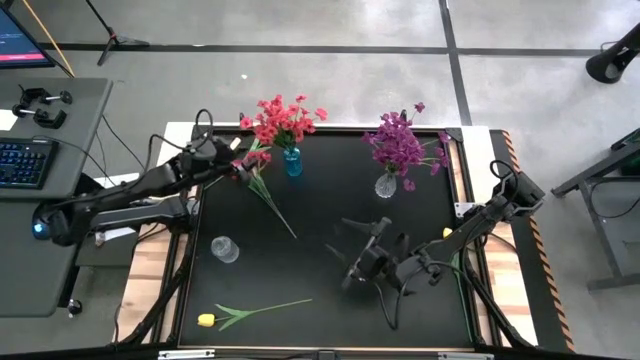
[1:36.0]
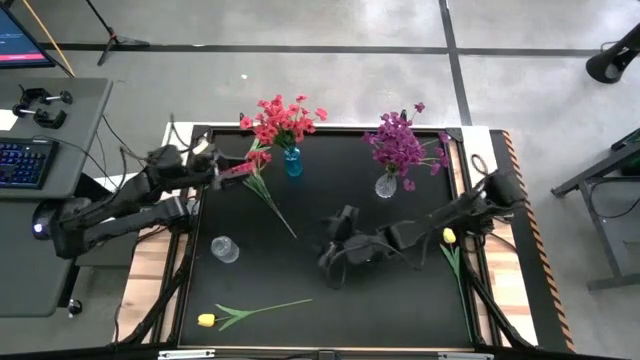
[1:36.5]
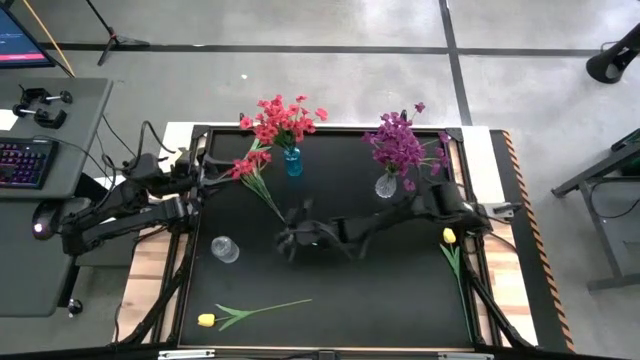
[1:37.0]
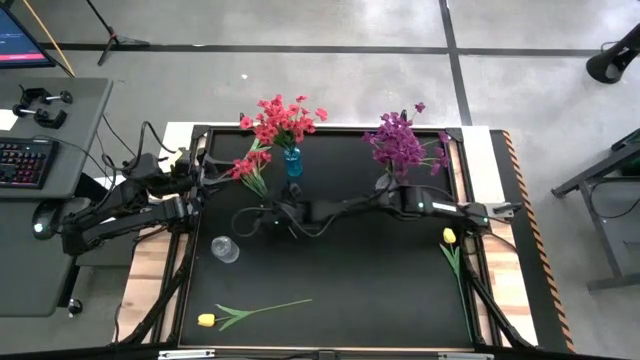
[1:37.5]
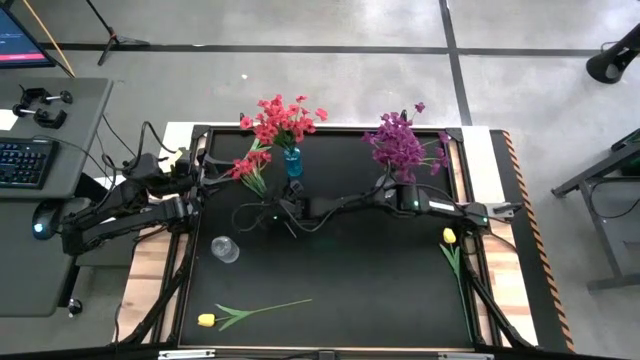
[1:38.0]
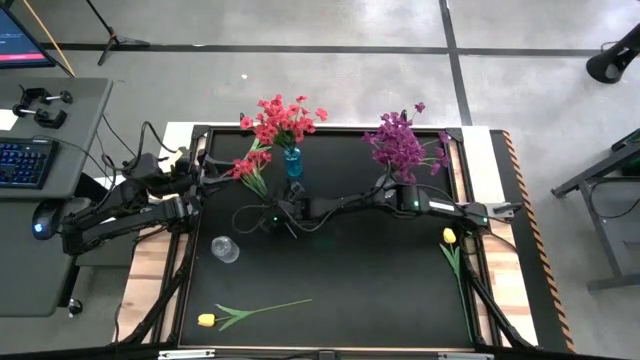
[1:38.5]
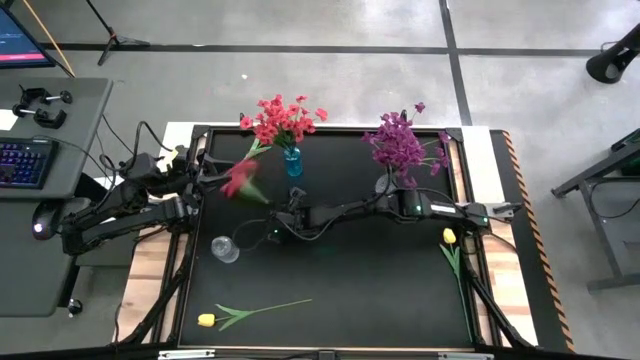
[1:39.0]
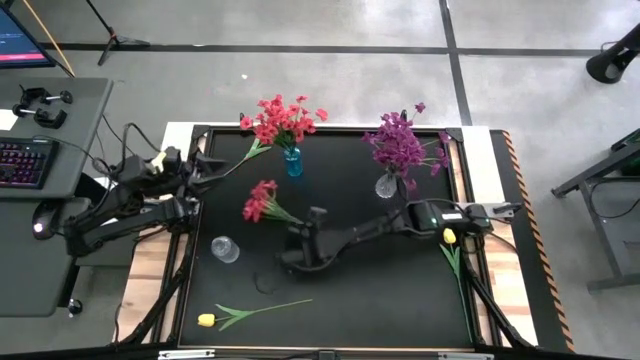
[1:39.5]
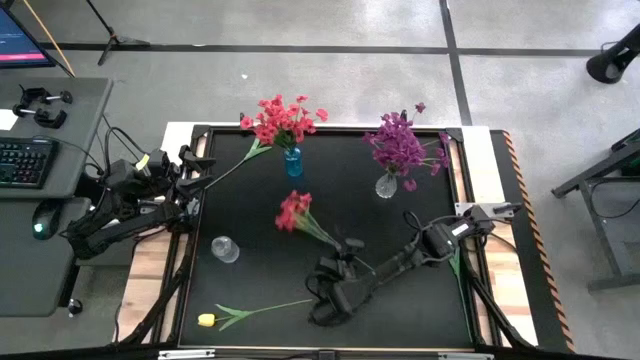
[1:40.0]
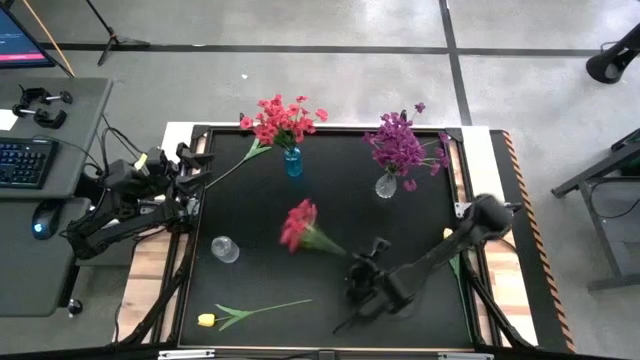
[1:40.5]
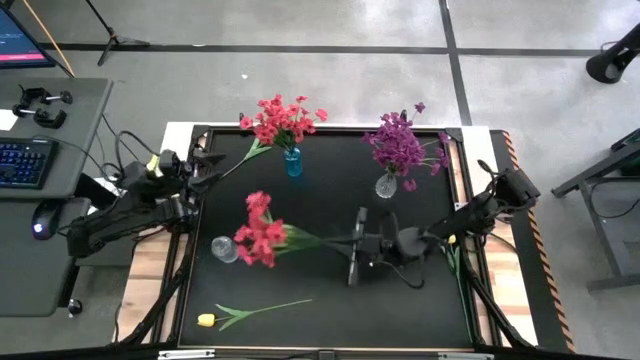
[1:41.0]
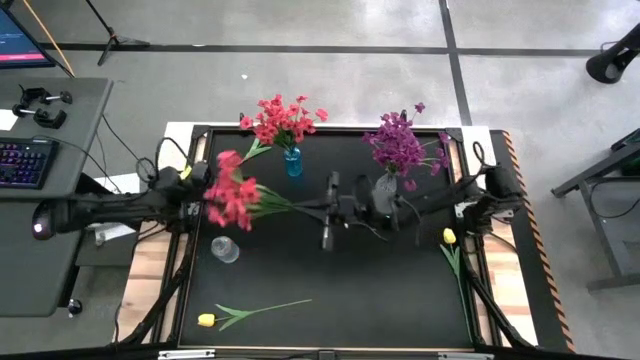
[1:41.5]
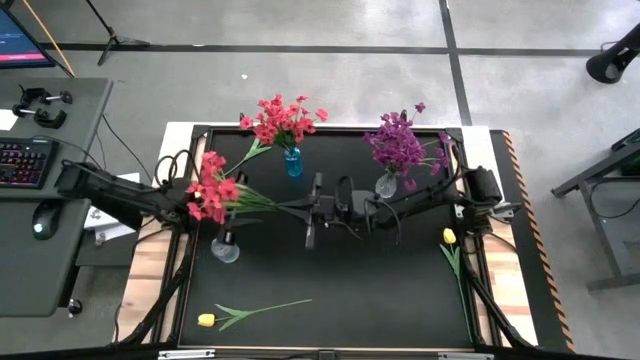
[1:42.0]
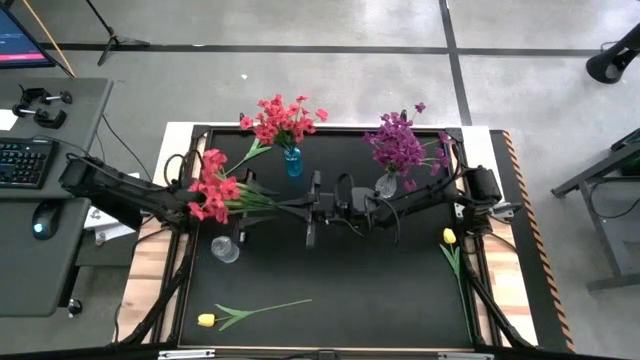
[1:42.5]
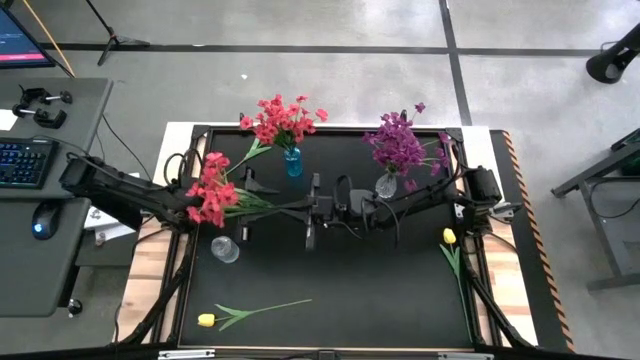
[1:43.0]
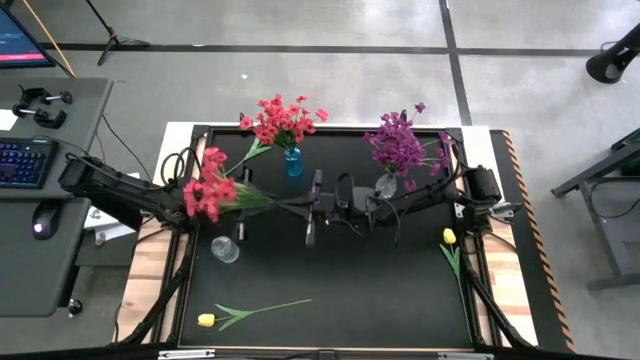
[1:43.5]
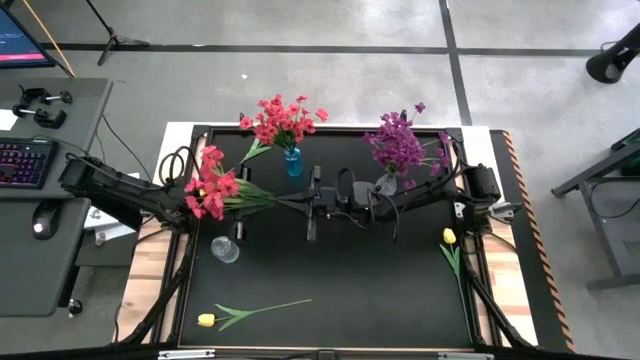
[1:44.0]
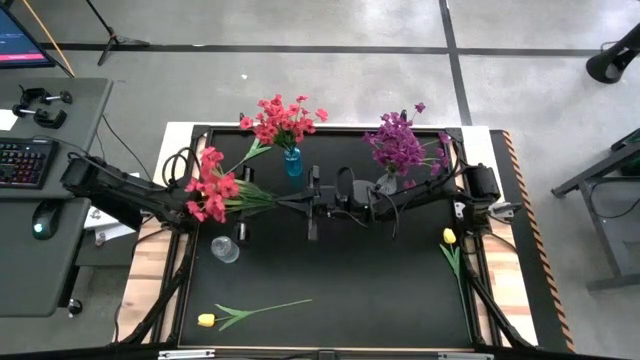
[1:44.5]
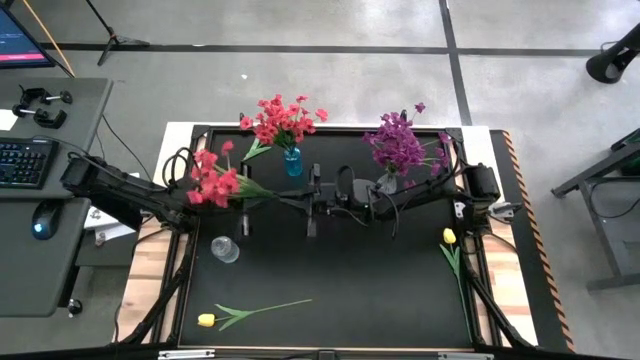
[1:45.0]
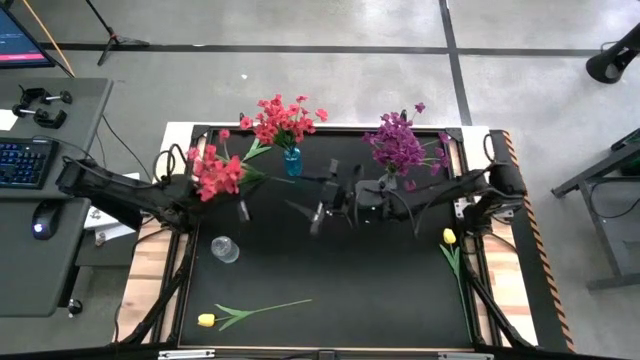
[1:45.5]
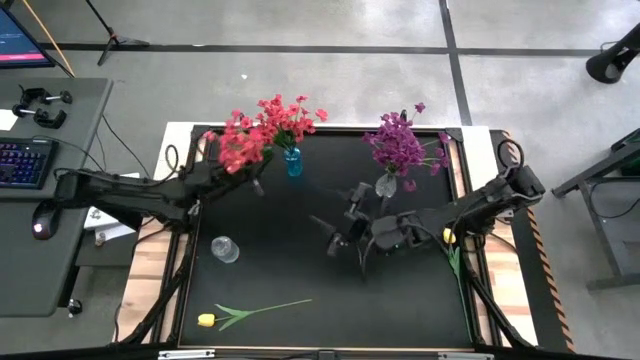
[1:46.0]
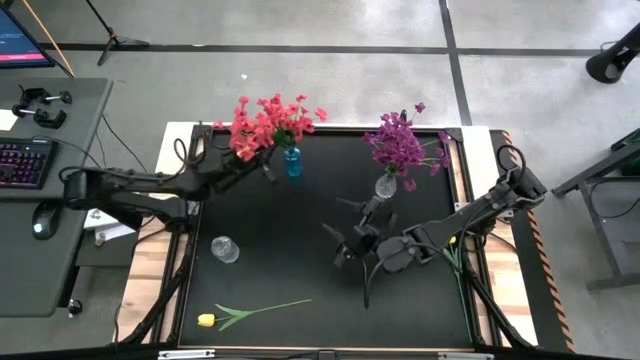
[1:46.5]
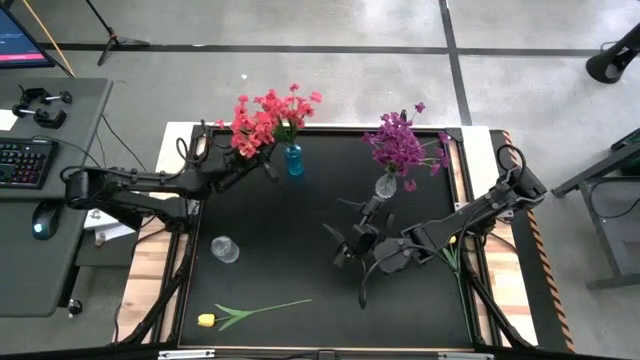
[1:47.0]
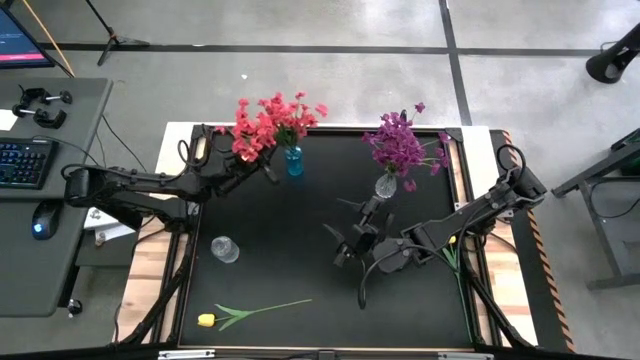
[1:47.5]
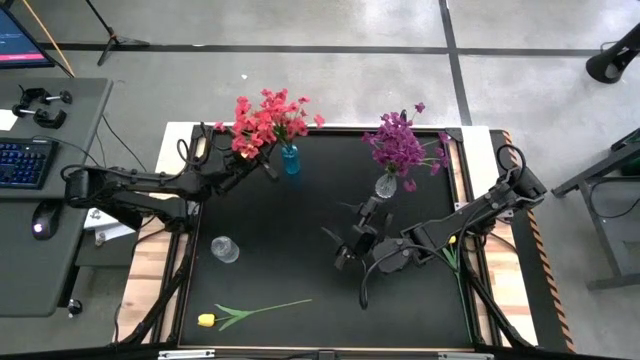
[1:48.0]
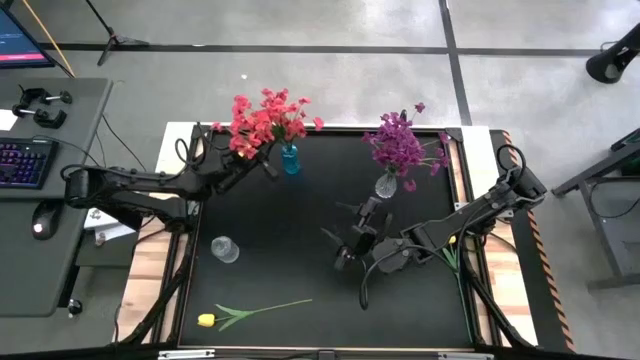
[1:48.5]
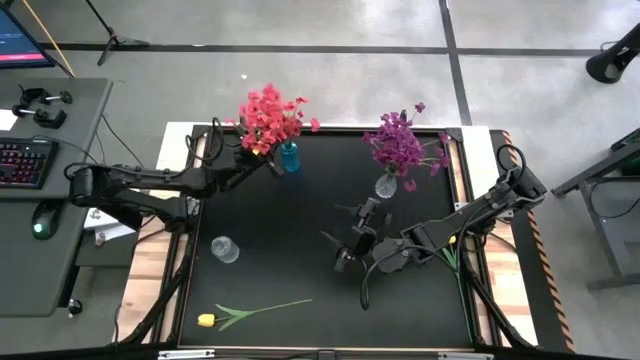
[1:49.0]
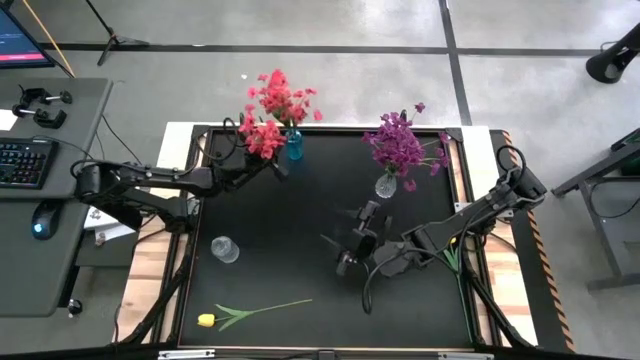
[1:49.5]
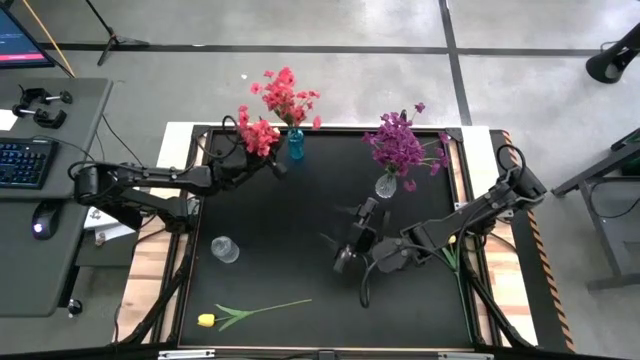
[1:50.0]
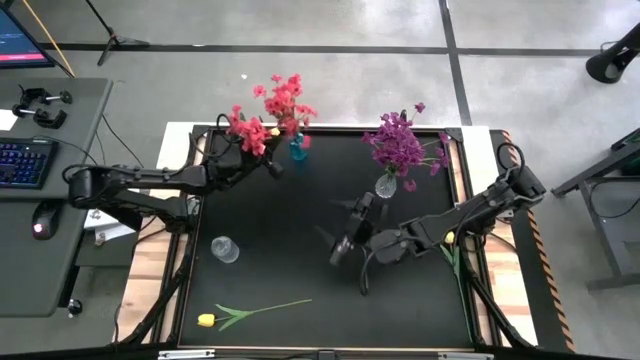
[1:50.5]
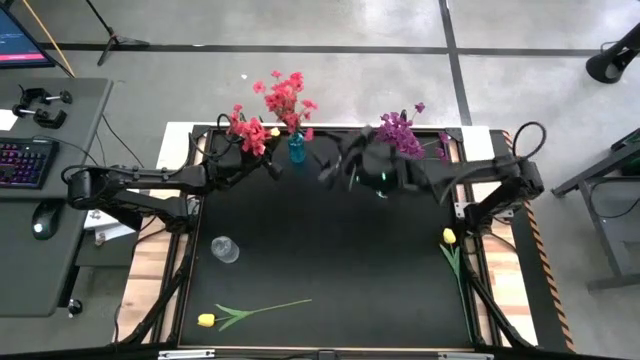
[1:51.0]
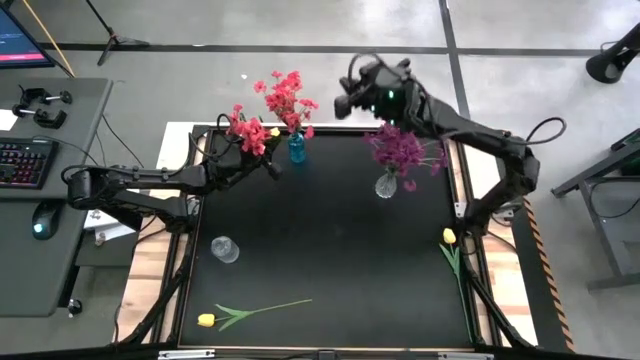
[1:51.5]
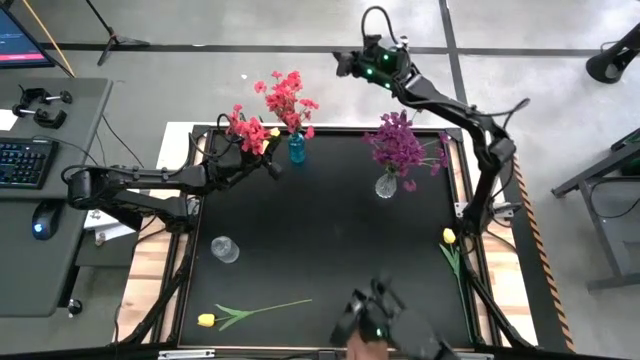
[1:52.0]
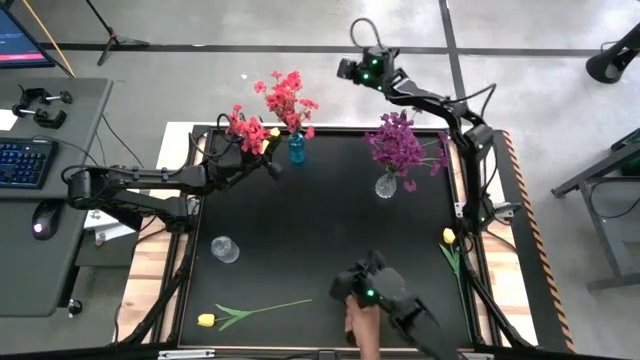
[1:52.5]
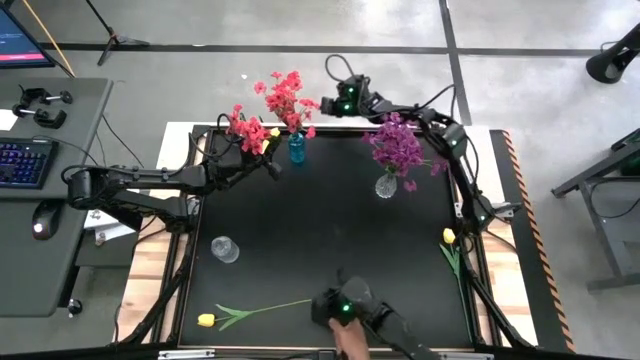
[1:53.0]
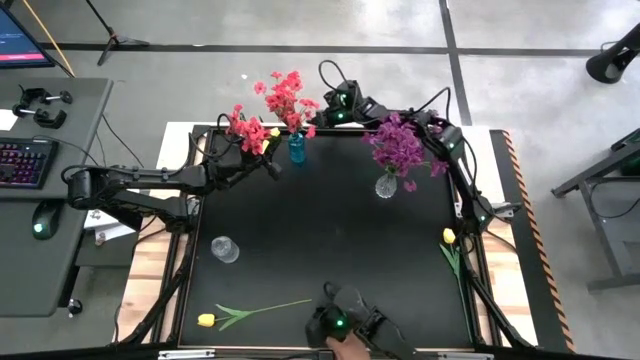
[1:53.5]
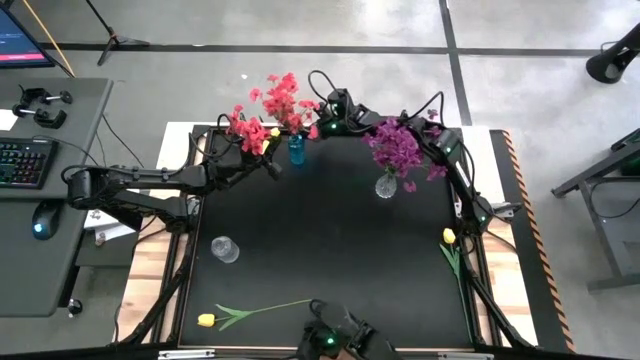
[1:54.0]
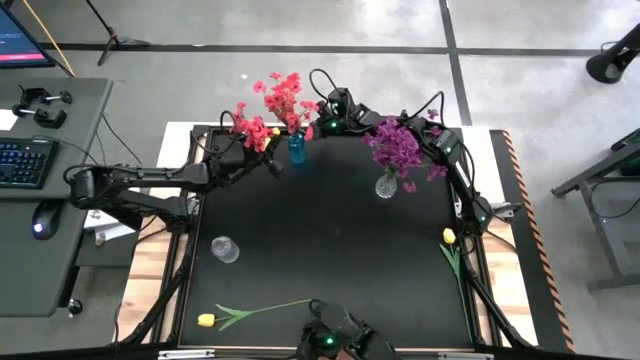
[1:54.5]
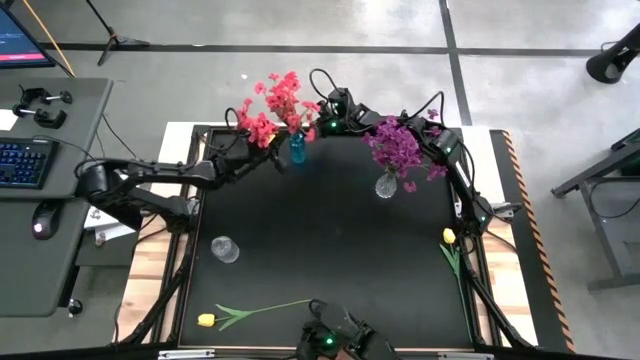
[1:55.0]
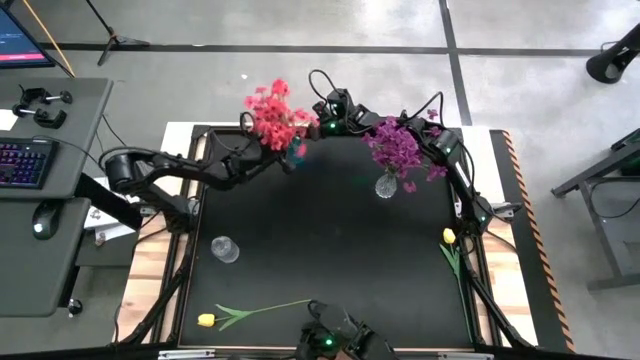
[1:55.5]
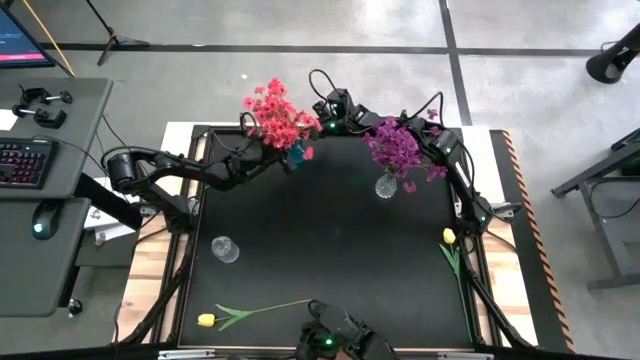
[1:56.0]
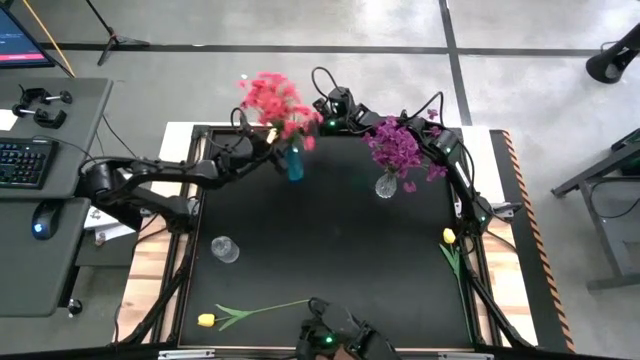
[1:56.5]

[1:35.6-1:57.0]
Task: Sort flowers into vase by color
Put the red flowers into the blue vase
